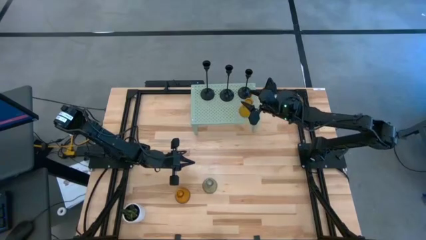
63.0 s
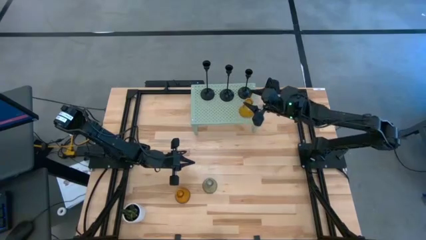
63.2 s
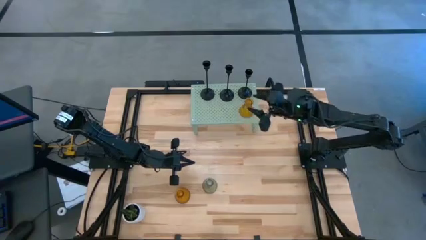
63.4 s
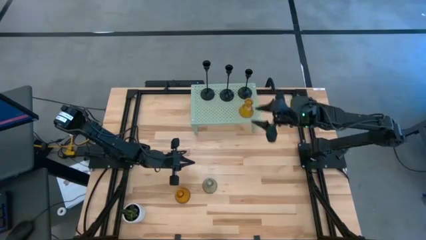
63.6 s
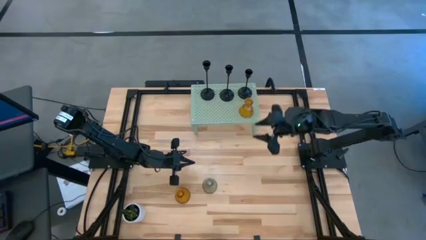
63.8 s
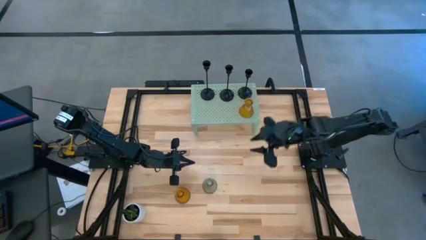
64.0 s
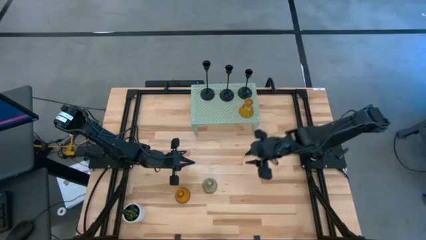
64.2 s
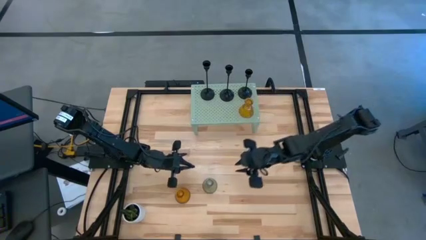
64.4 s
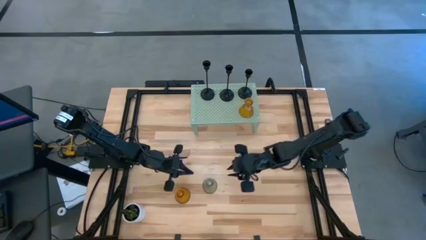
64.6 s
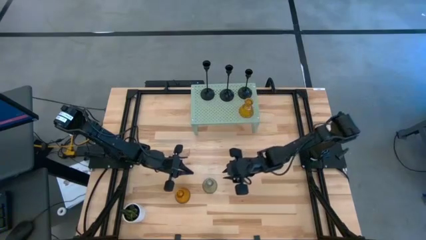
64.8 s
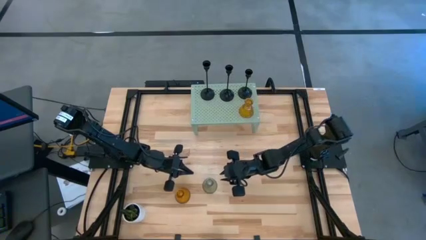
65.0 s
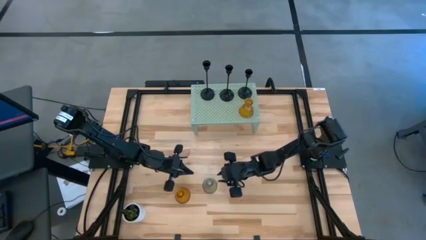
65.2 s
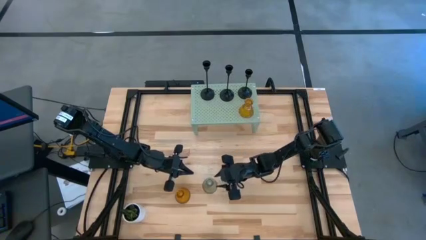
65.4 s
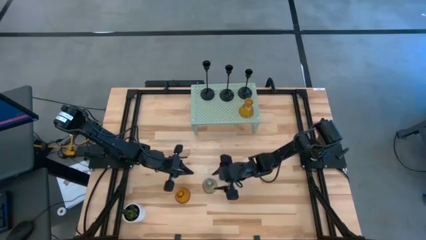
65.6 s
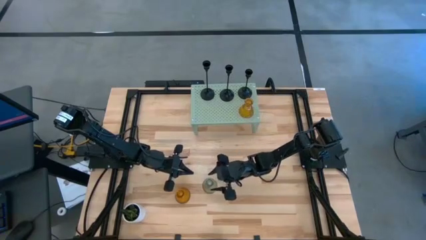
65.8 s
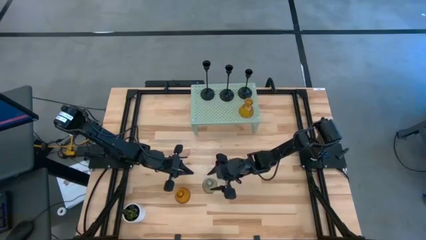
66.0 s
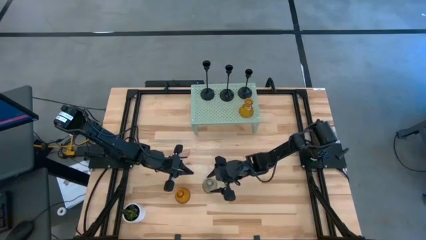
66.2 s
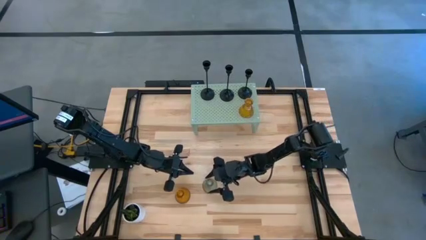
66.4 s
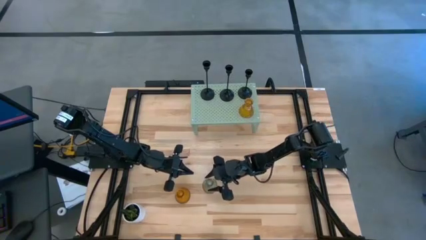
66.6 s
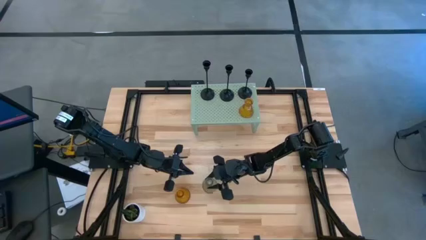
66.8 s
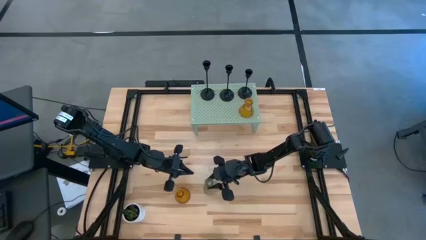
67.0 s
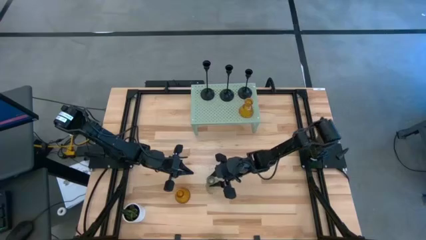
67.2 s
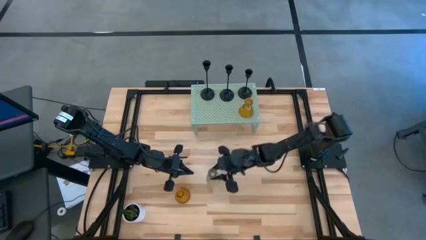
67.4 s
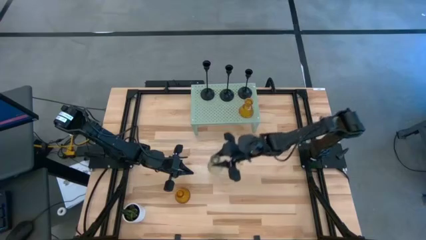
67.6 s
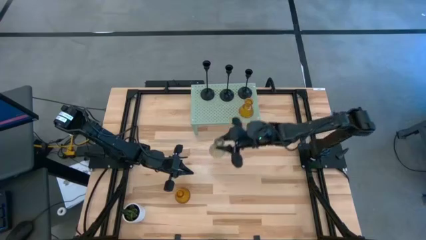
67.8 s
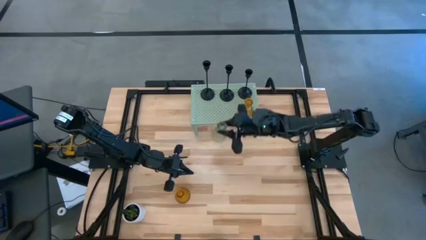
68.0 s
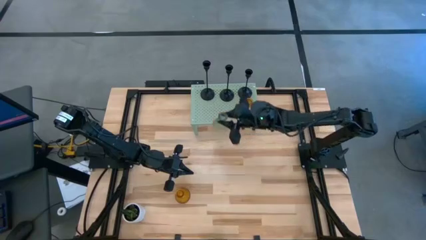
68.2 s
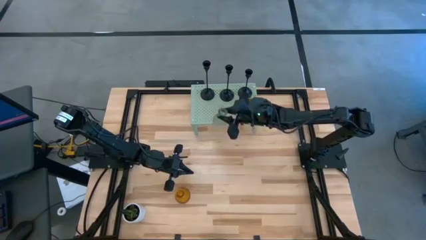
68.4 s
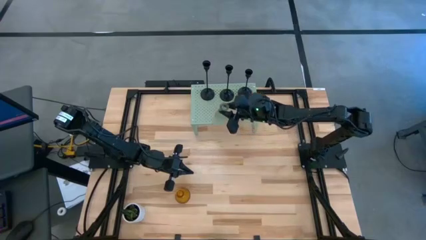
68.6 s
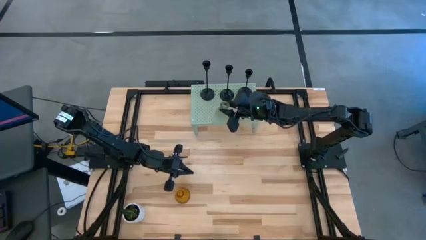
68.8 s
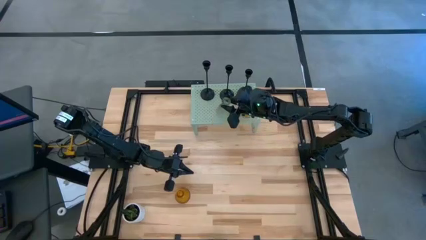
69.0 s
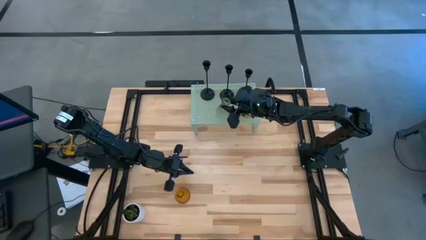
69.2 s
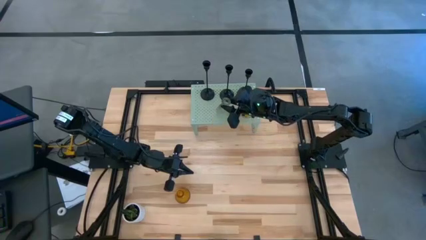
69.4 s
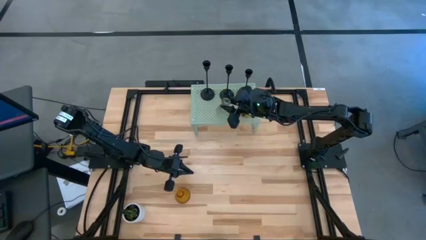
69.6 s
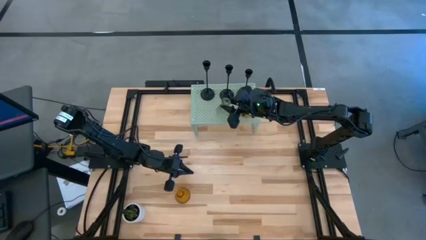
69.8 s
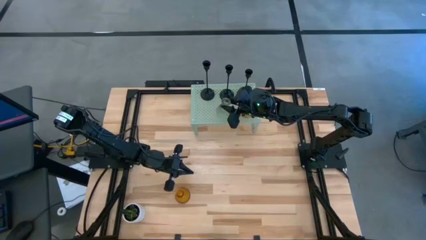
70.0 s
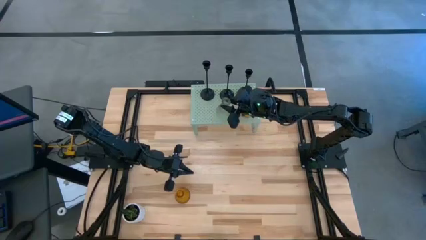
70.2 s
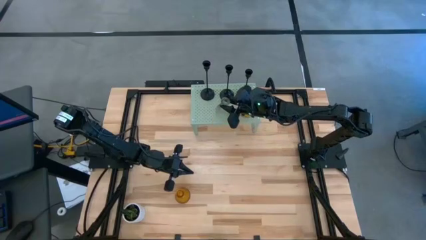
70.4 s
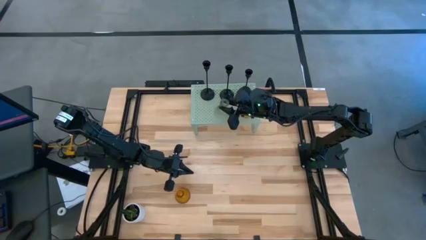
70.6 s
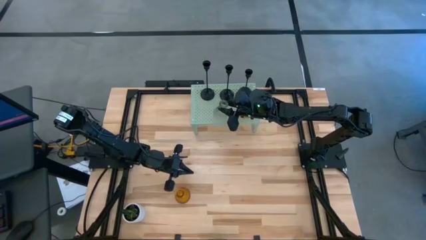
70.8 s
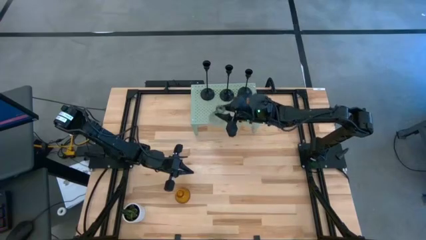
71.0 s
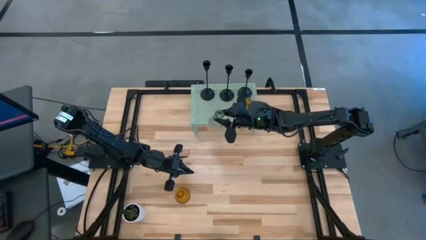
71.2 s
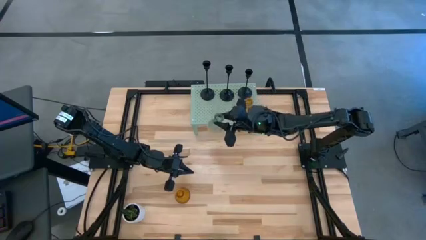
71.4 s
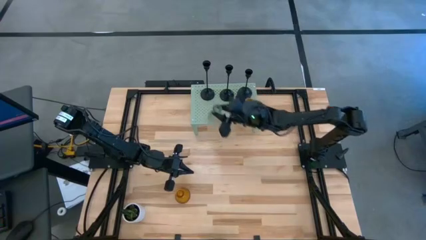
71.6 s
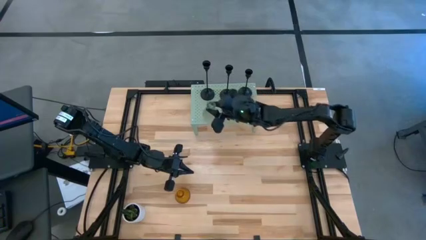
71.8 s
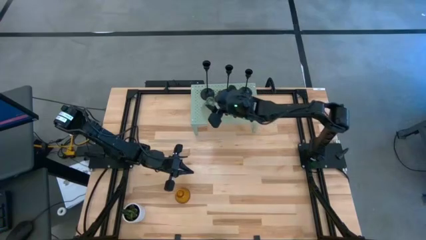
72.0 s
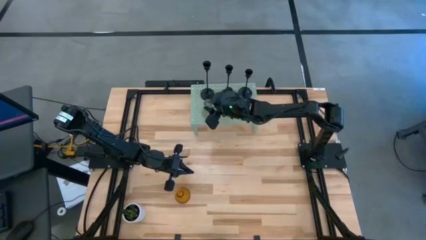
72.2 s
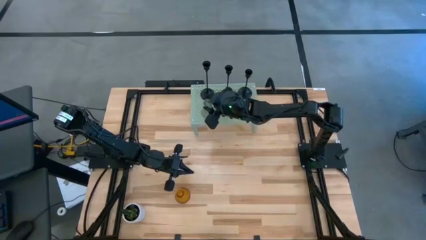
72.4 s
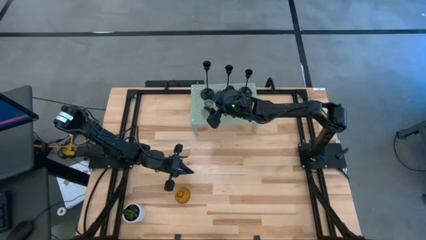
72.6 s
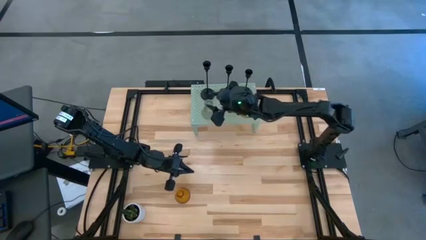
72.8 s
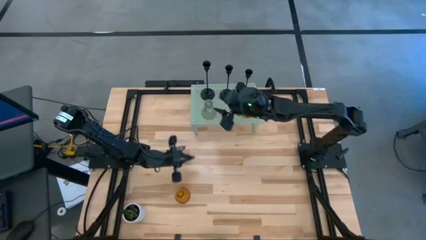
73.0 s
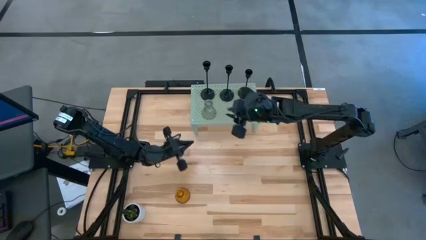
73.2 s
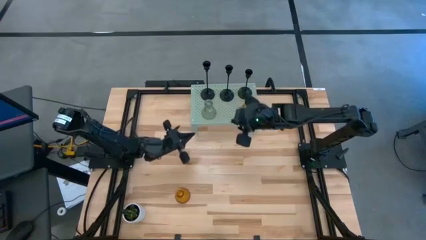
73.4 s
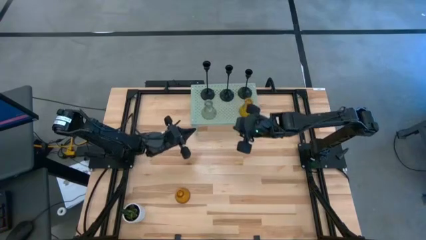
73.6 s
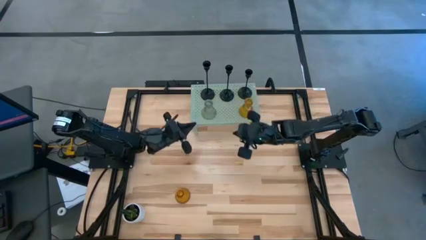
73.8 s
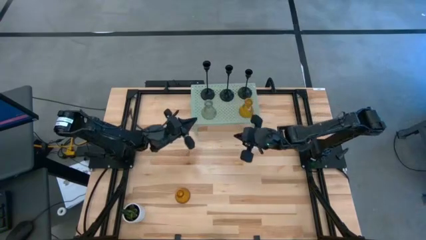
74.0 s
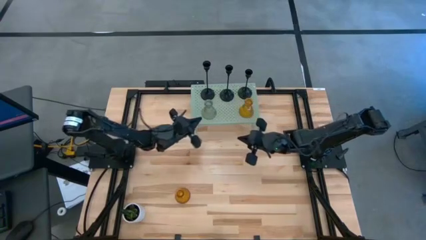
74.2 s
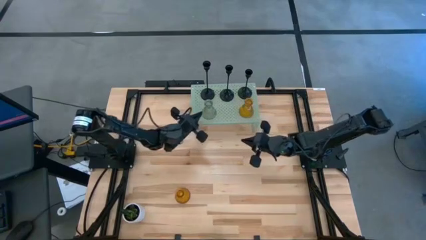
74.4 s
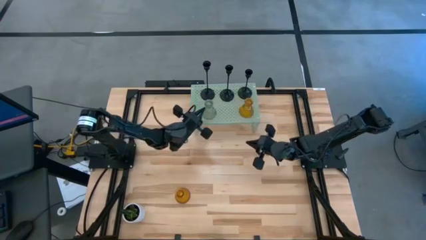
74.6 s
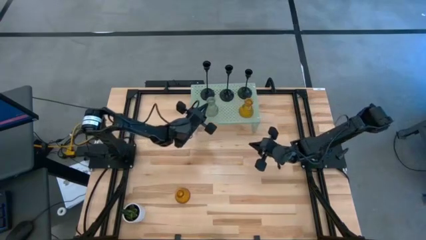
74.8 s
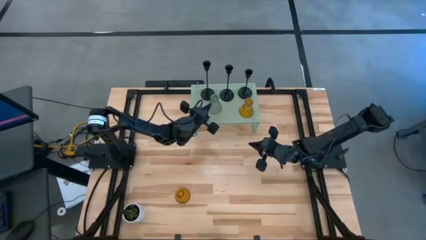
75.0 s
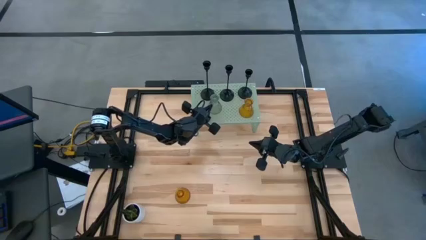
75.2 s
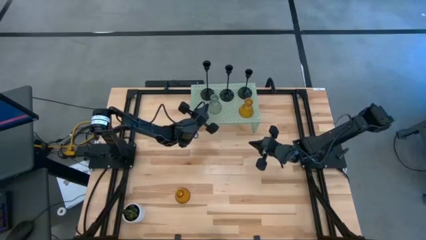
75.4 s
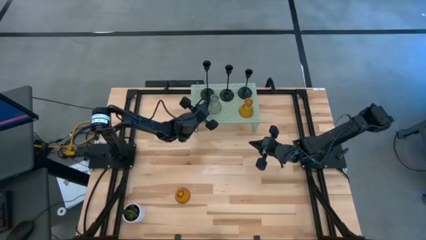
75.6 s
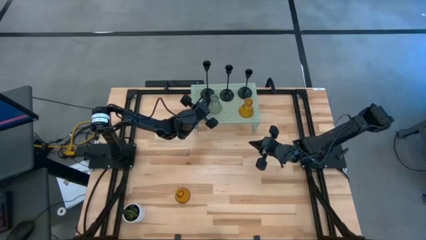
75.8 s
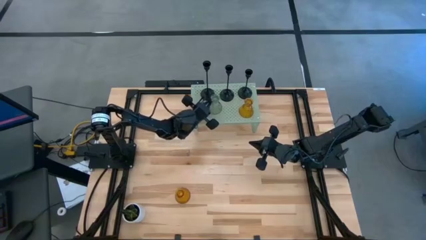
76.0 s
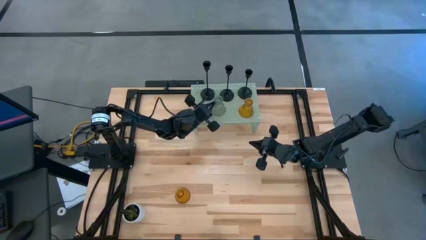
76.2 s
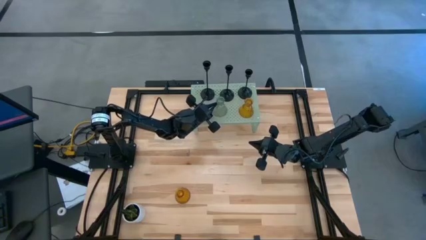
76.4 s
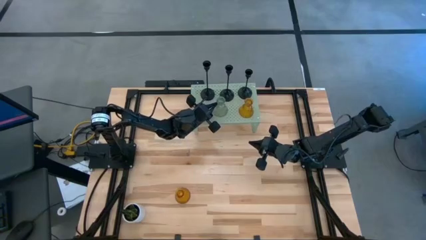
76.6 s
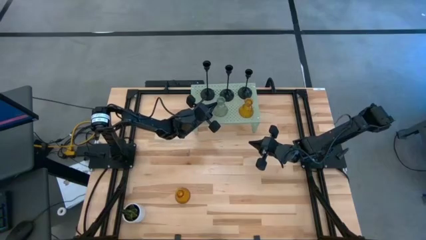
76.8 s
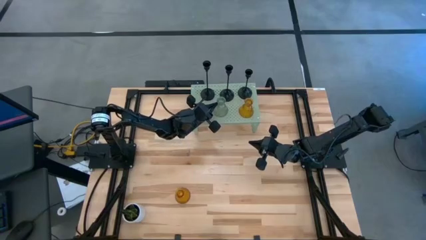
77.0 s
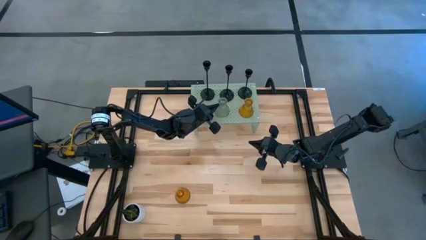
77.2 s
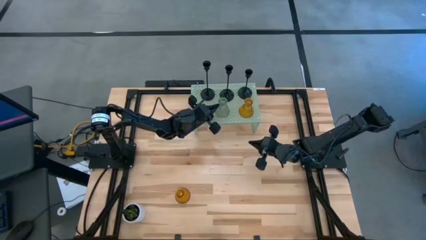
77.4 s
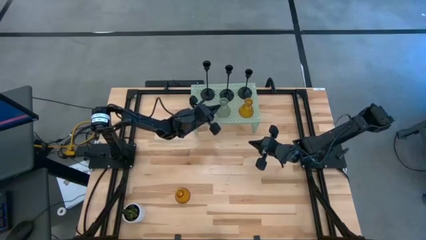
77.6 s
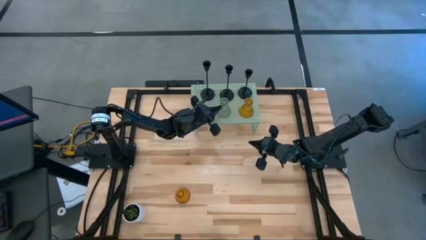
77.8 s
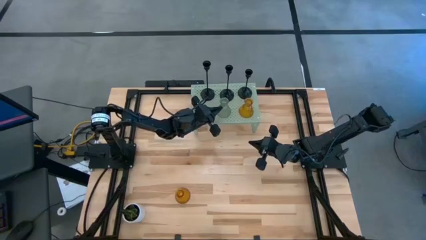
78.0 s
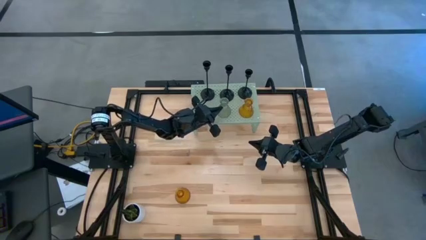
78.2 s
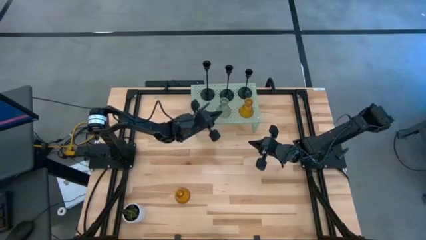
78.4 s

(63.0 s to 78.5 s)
Task: Pick & Place candle stick holders
Put the glass candle holder on the shelf

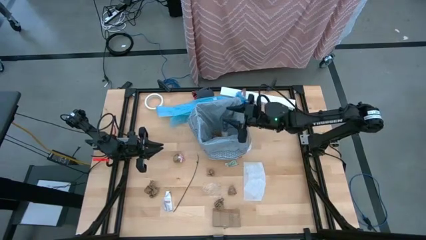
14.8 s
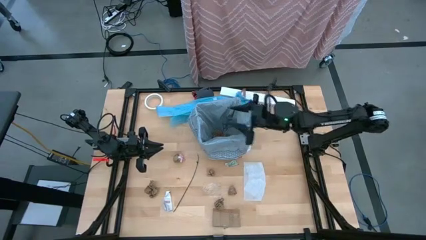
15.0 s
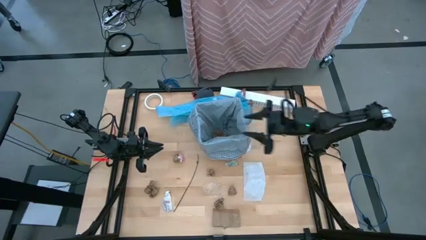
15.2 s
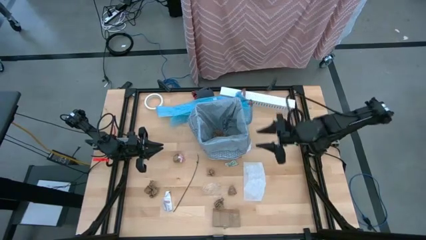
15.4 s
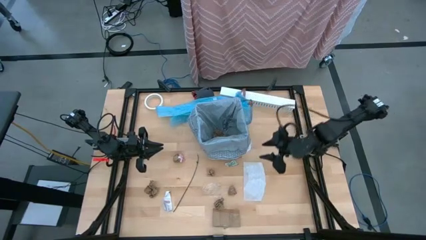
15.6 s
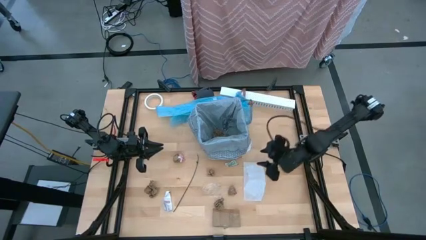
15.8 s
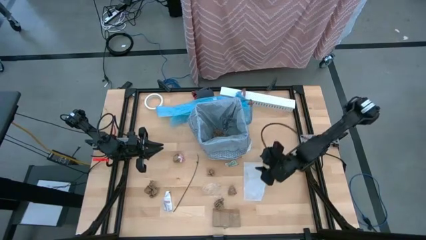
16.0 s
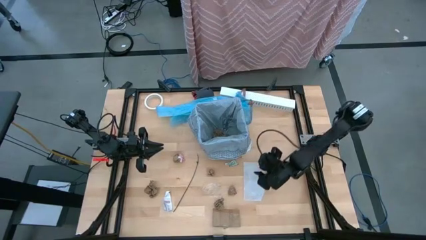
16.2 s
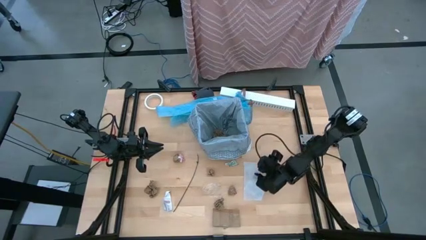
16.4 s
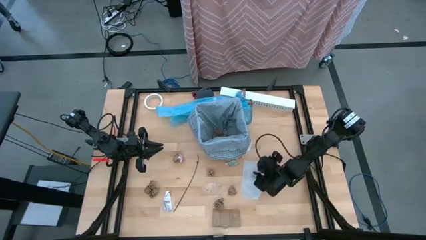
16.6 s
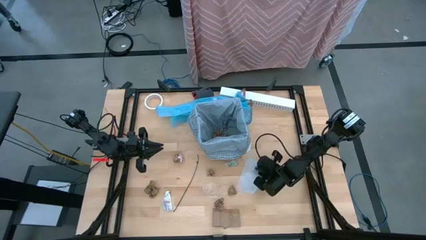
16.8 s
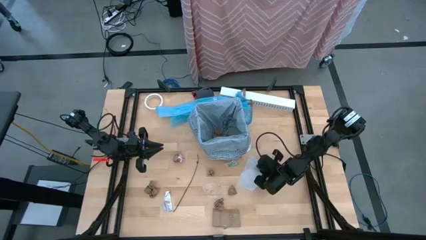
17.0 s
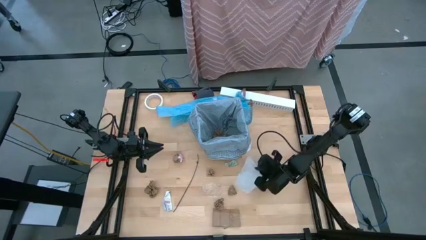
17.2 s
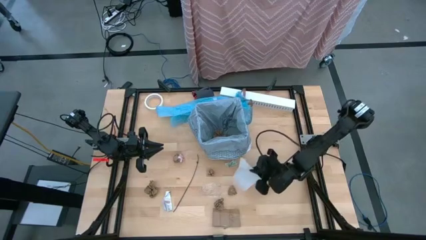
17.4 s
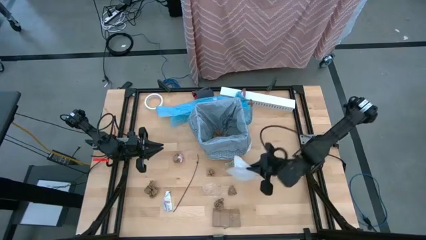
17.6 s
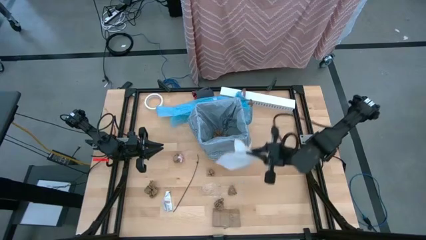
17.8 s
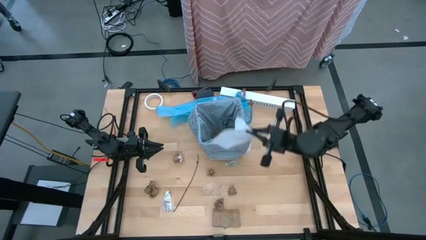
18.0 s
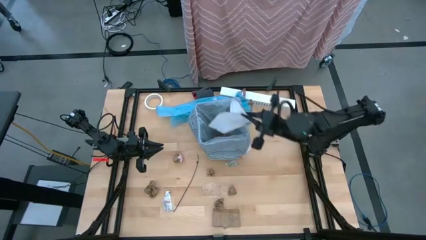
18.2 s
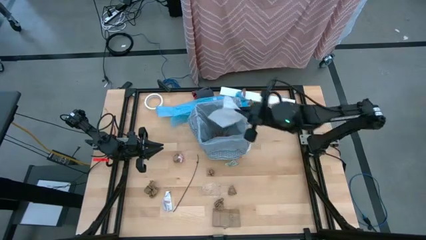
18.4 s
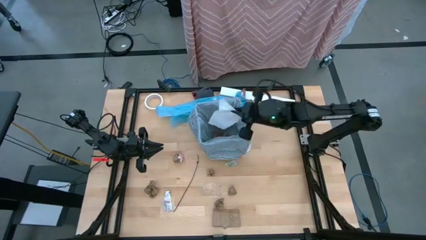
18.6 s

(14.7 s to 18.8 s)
Task: place trash/remove bag and relplace
Put the bubble wrap inside the black trash bin
